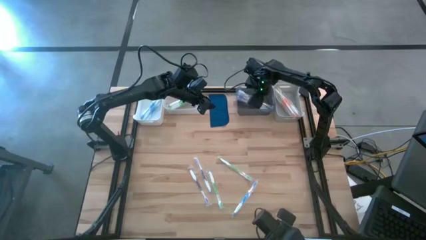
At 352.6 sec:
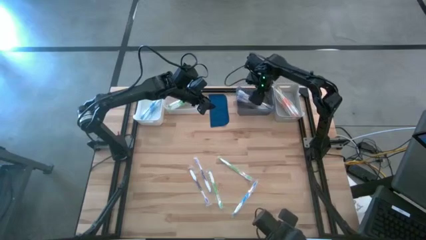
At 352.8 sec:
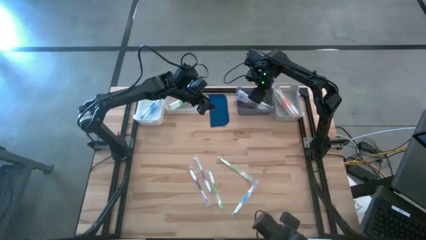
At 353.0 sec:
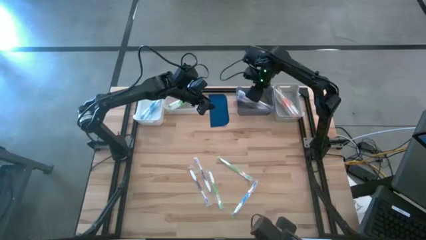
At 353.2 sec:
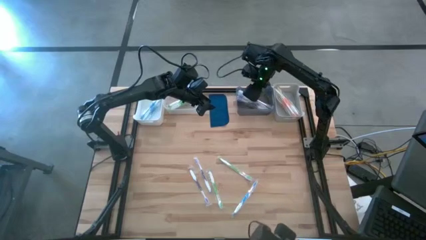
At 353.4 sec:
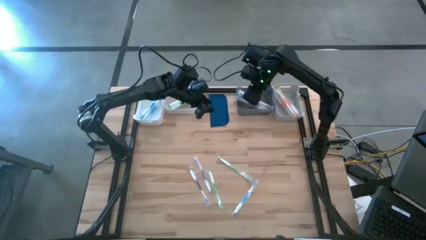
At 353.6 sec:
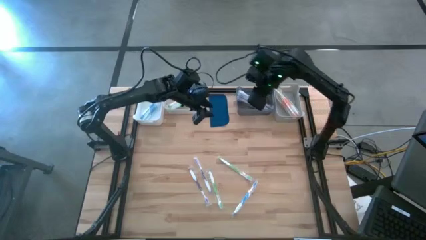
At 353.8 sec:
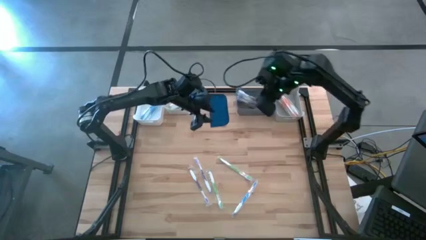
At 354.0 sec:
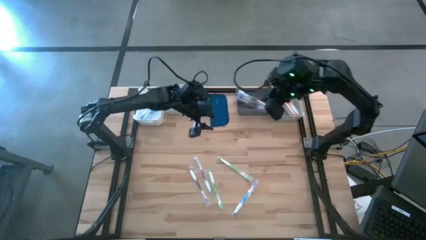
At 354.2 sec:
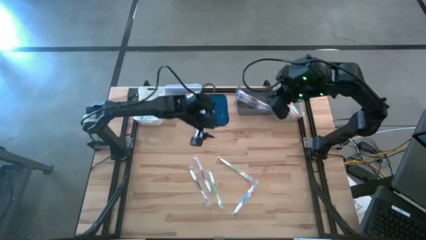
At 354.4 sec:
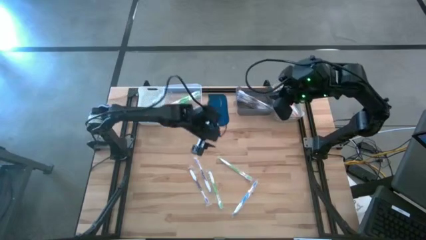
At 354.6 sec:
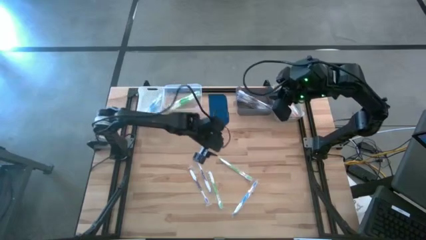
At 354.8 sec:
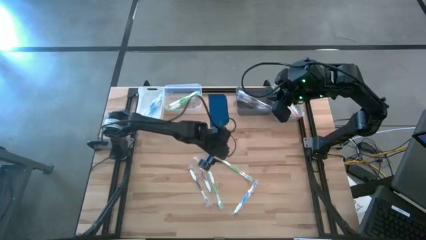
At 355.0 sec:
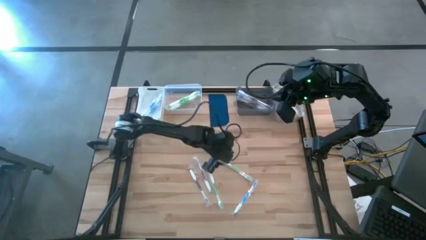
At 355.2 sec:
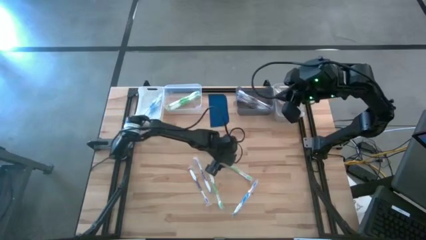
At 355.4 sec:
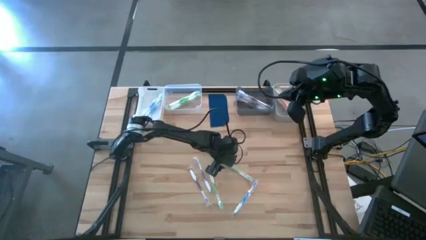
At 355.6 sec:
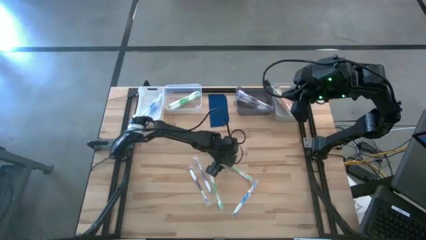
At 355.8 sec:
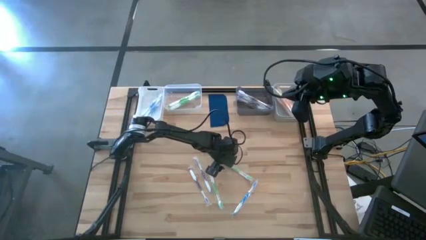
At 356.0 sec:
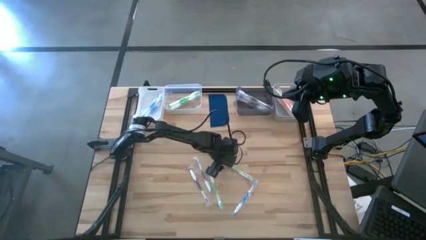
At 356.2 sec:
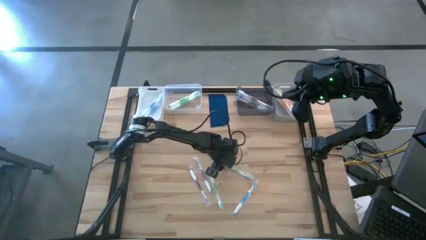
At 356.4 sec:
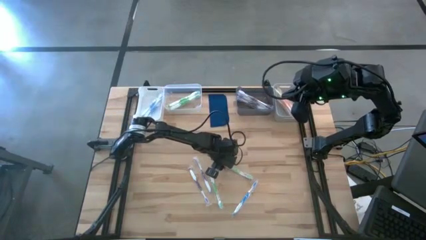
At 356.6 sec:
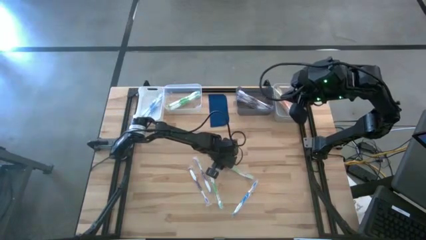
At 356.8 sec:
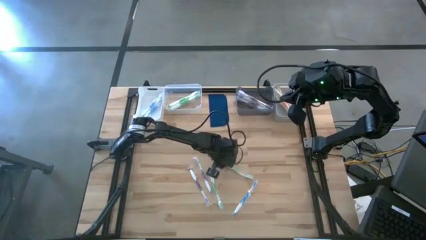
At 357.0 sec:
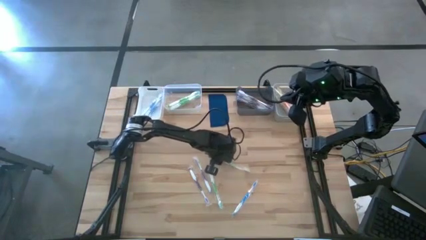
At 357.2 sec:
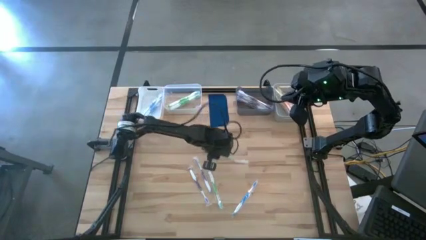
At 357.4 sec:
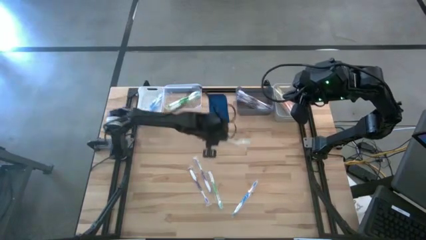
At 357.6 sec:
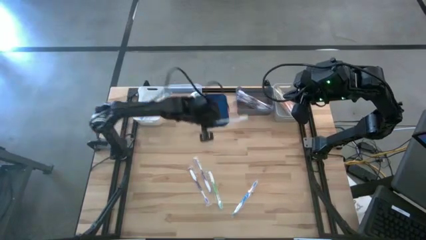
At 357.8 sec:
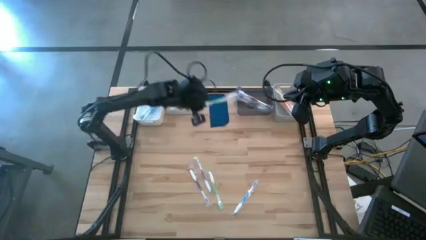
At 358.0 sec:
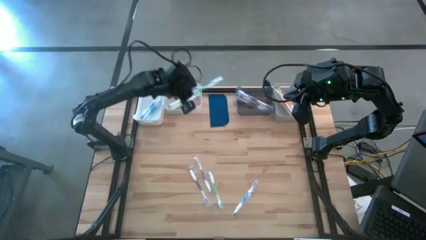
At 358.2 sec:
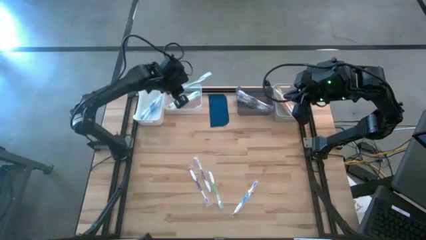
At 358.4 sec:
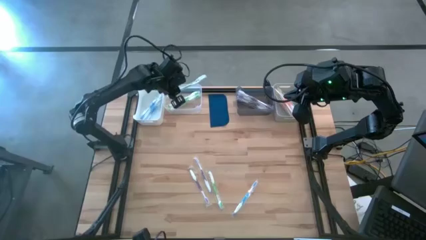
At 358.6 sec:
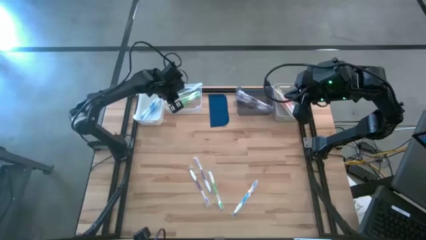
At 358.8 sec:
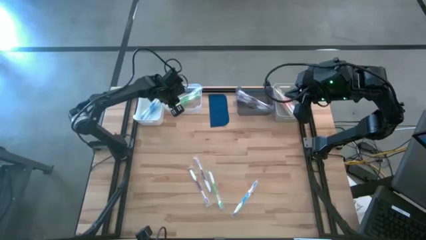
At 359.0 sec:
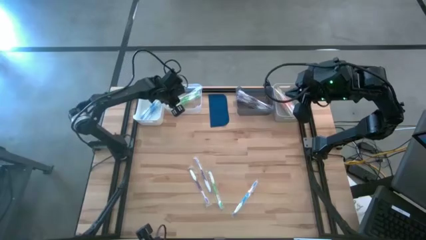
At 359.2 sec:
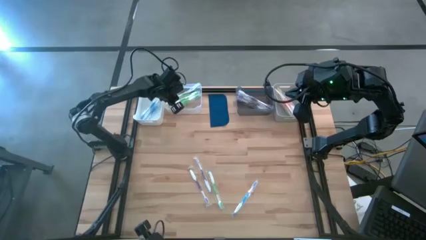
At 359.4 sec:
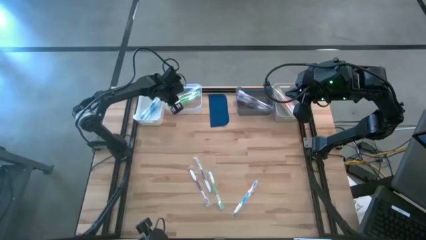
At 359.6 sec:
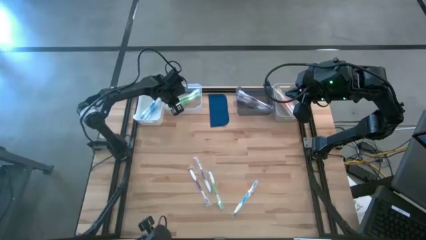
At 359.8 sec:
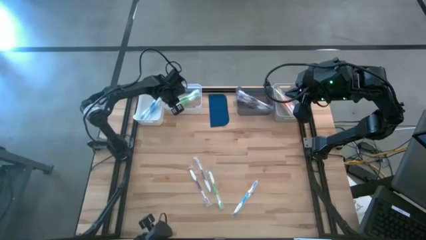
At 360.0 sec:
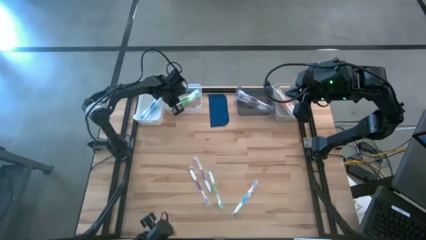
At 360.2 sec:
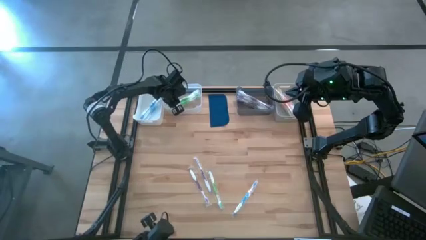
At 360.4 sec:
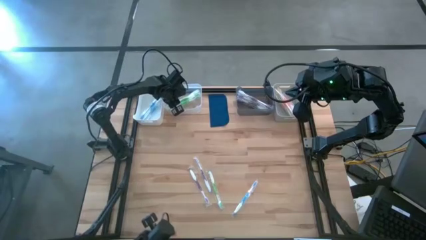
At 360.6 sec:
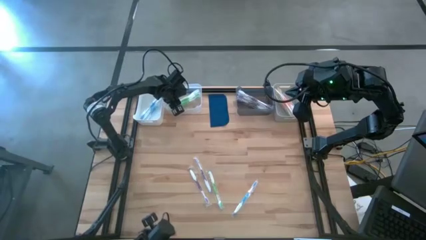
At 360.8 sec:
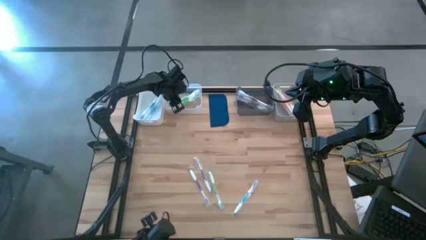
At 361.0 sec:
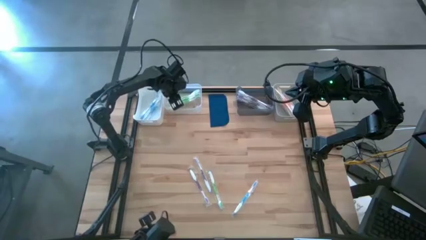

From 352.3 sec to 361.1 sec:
Task: Pick & Place Toothbrushes
Put the green toothbrush into the transparent bin

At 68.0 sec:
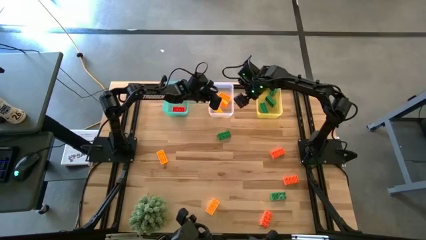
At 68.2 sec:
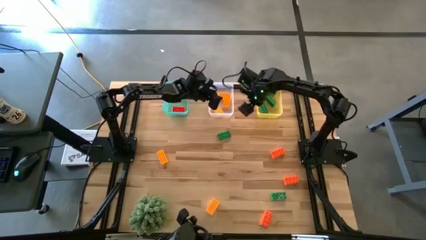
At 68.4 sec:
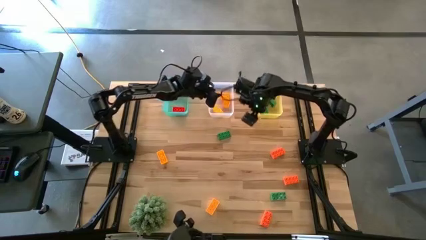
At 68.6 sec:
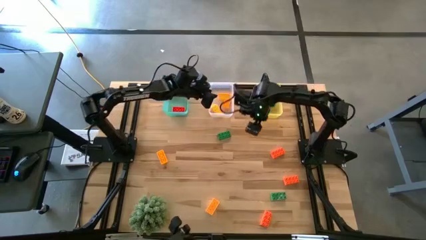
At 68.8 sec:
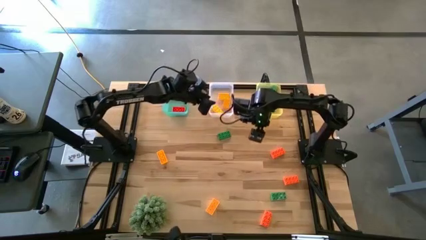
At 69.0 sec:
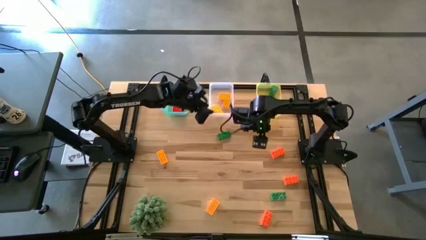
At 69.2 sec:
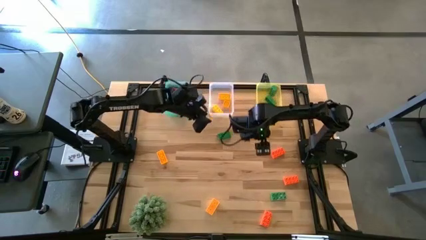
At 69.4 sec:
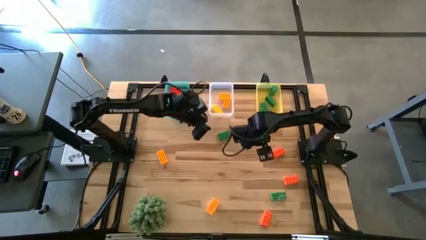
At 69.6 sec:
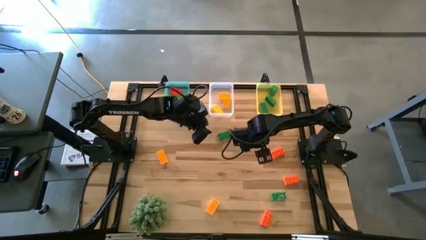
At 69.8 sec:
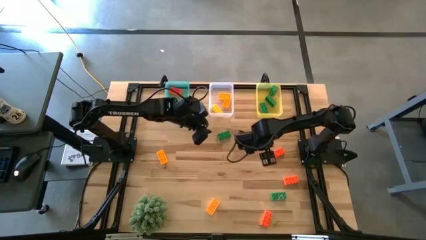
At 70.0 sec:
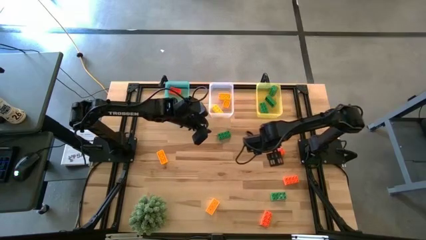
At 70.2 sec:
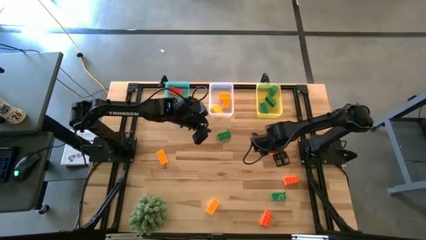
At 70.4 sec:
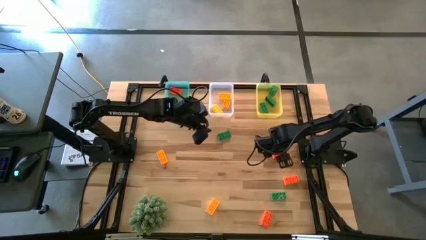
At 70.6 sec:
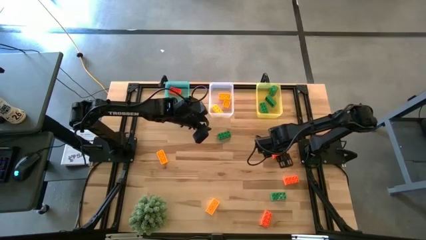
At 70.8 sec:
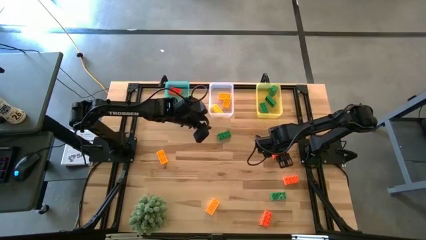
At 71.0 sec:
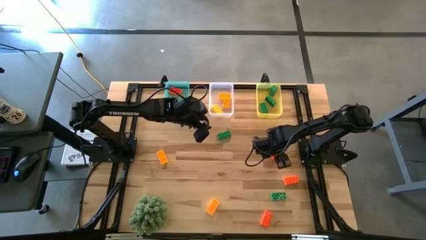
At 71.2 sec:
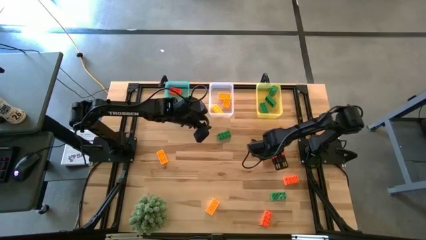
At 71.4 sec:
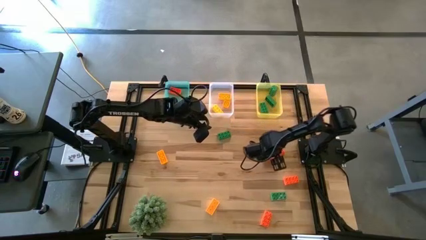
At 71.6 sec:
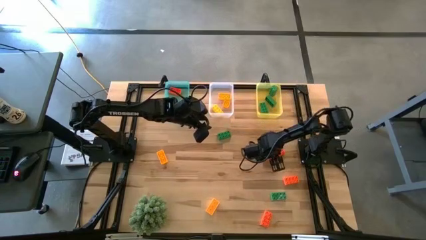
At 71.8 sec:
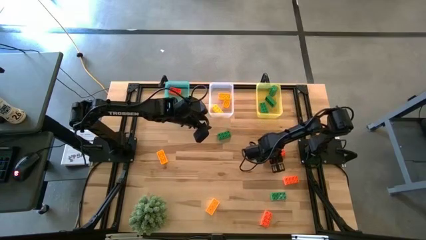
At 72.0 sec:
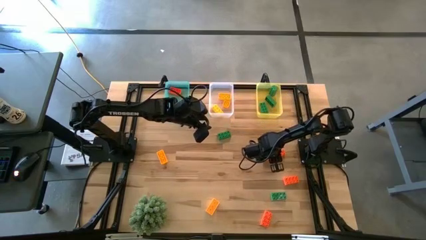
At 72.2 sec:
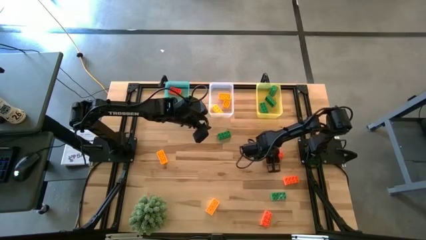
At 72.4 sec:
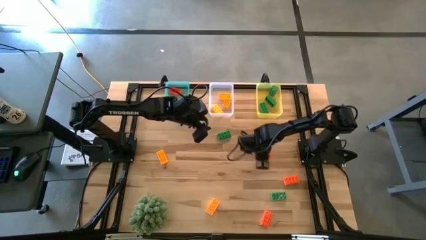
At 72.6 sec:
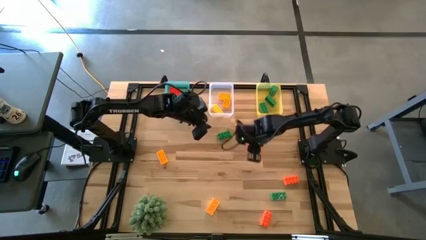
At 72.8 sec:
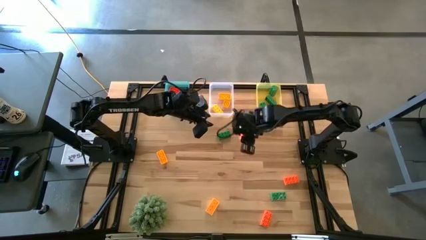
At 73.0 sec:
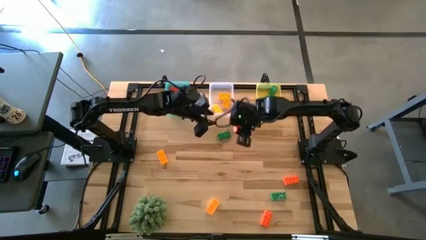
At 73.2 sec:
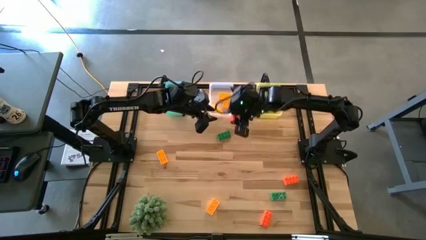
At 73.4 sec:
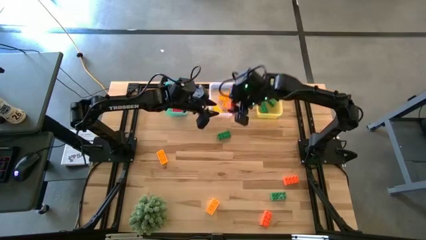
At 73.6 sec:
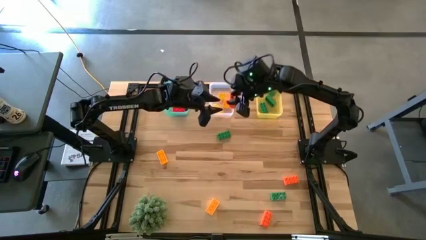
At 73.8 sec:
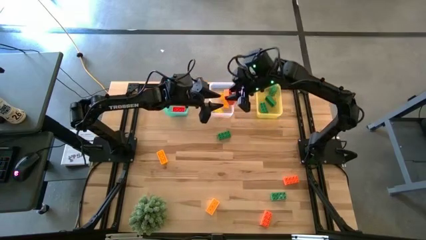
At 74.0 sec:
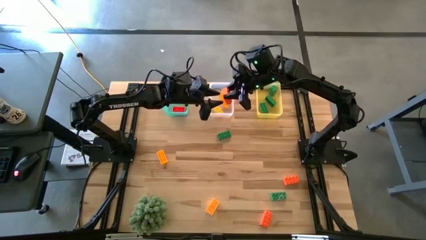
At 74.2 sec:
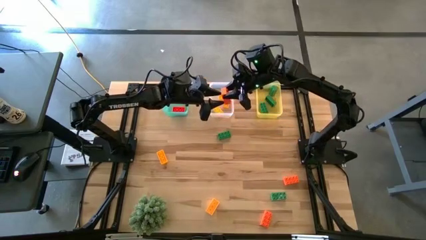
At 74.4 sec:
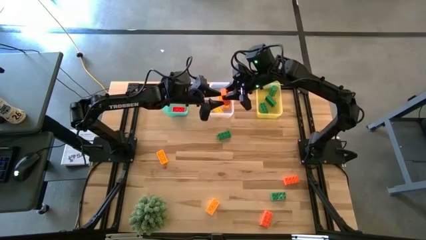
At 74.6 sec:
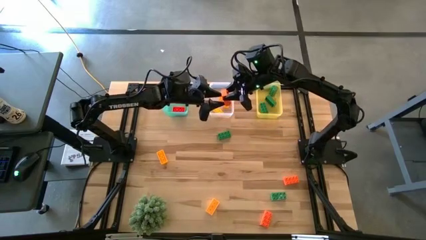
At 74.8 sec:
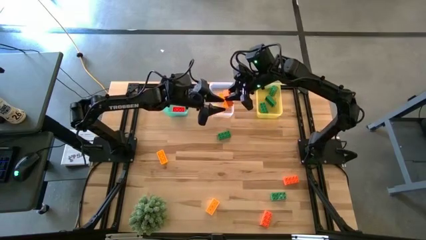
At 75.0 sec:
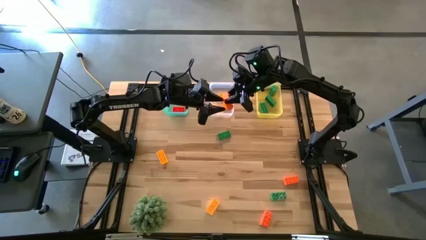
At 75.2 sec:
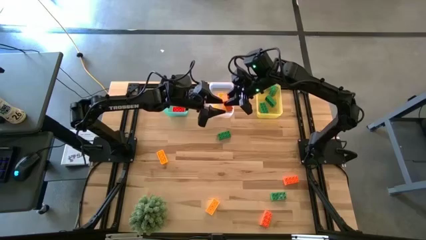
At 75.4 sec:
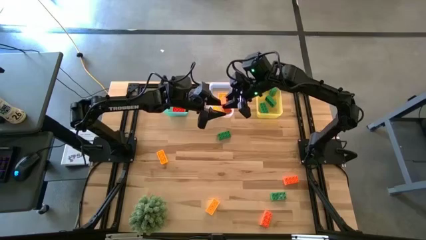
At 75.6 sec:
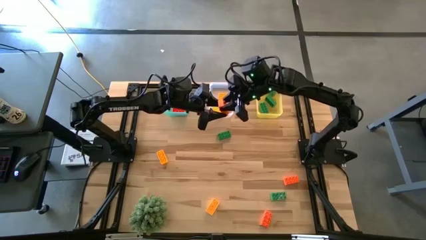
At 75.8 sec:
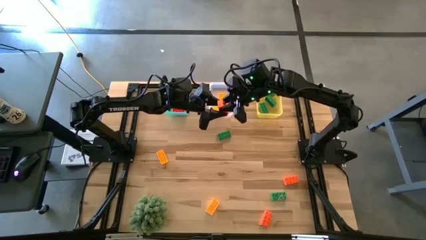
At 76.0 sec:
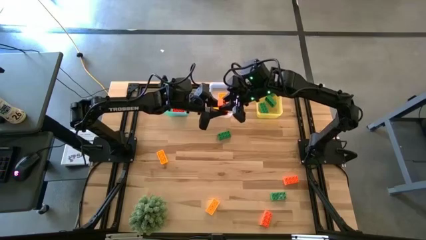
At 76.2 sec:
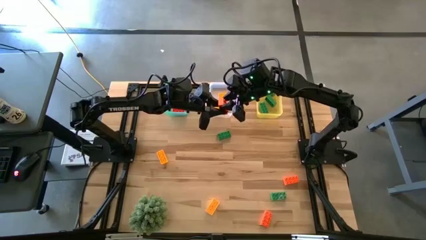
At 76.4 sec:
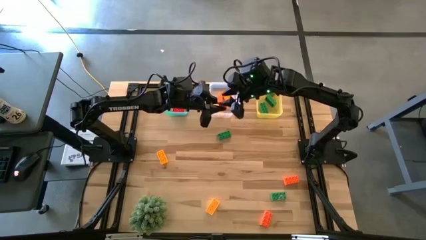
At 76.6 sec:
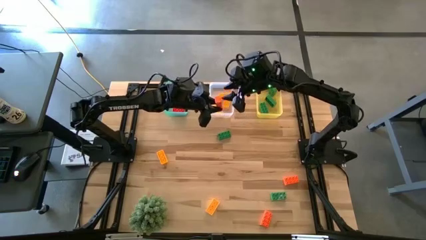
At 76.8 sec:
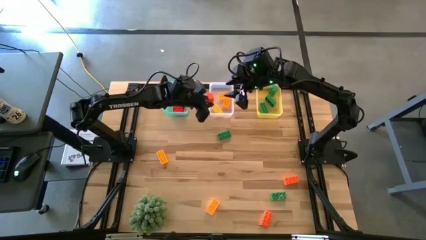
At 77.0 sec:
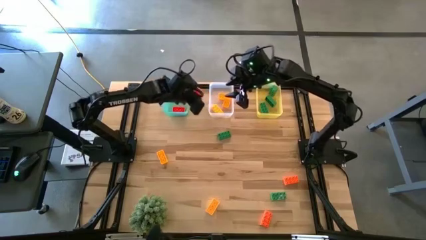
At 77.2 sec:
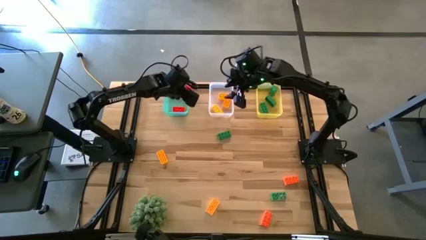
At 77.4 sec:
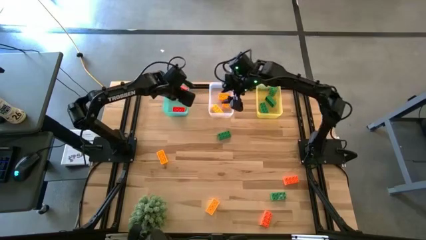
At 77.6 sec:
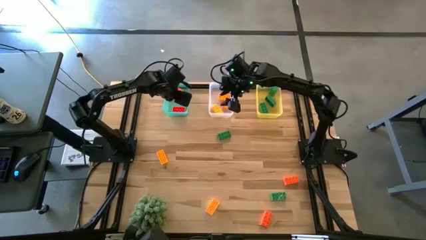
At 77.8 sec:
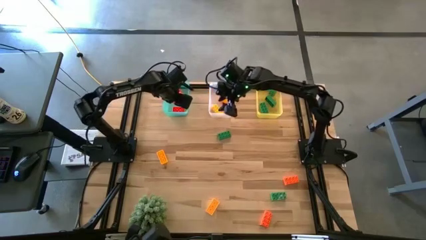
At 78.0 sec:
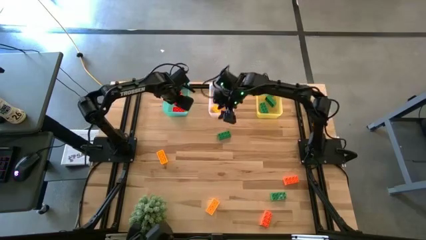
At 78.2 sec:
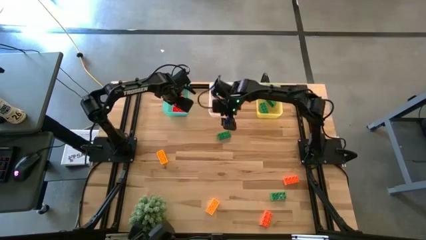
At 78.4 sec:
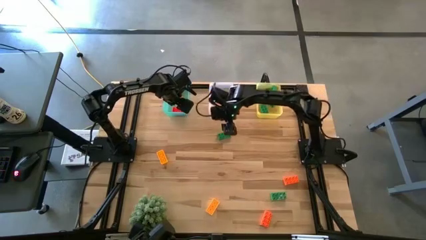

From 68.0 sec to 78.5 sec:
Task: Sort & place blocks by color
Put the orange game piece into the blue bin
